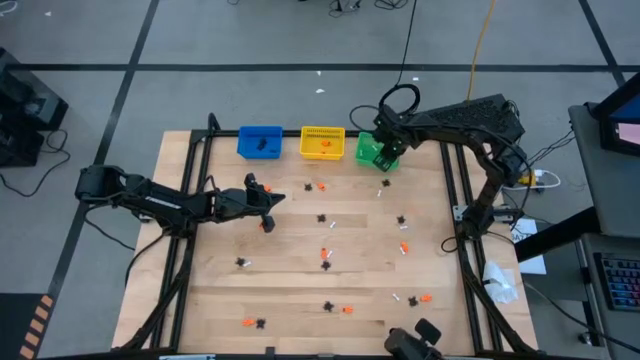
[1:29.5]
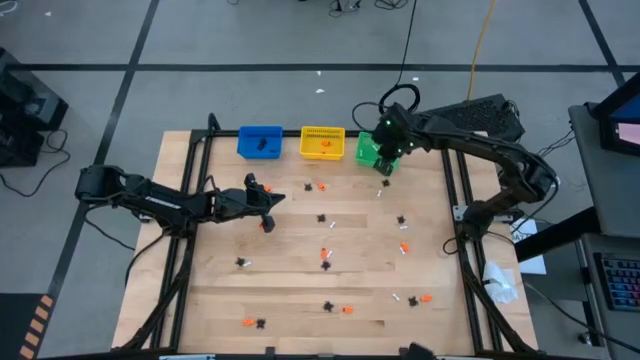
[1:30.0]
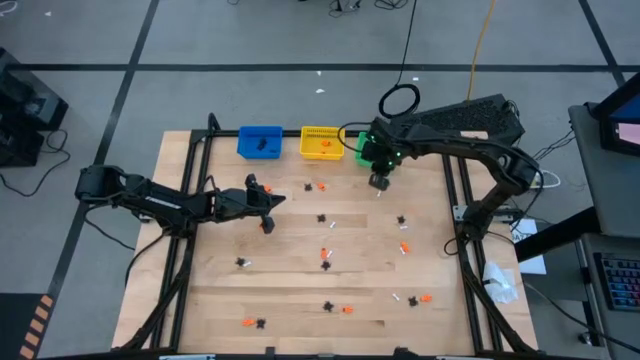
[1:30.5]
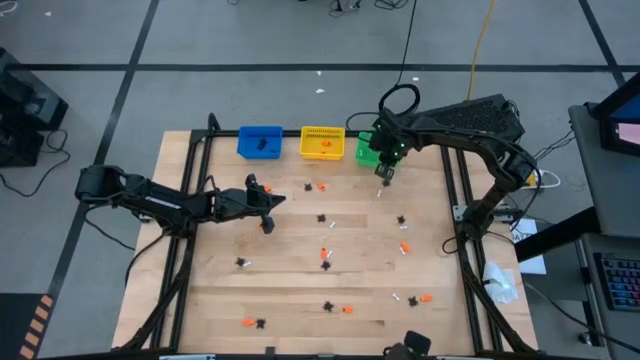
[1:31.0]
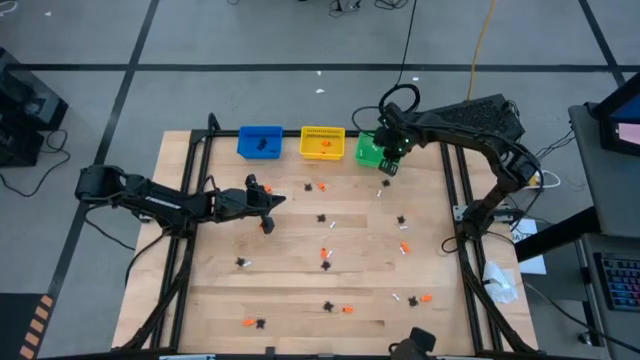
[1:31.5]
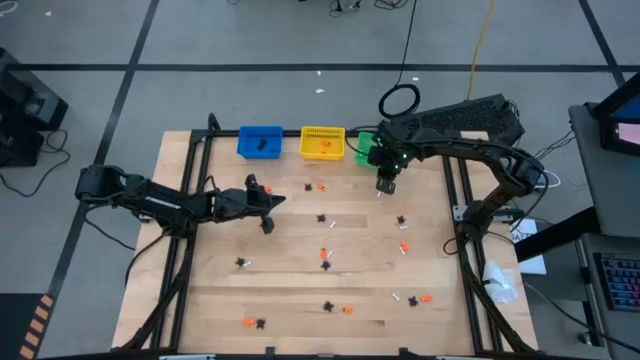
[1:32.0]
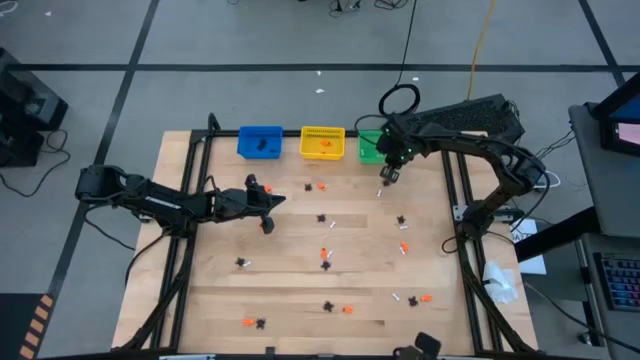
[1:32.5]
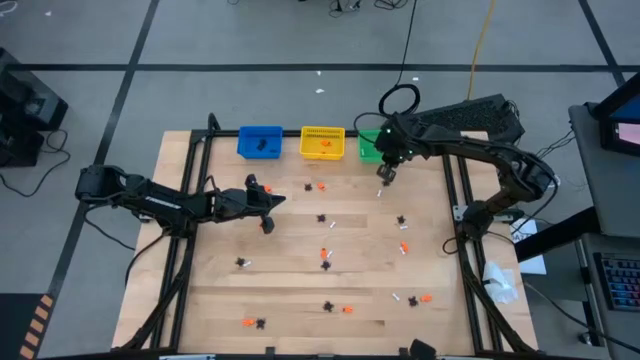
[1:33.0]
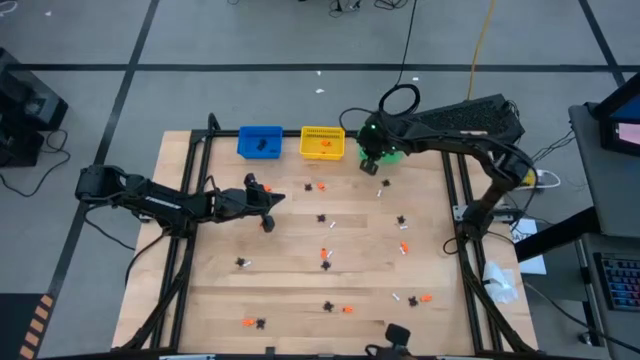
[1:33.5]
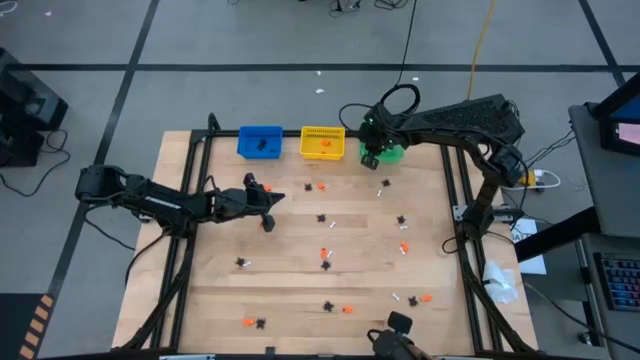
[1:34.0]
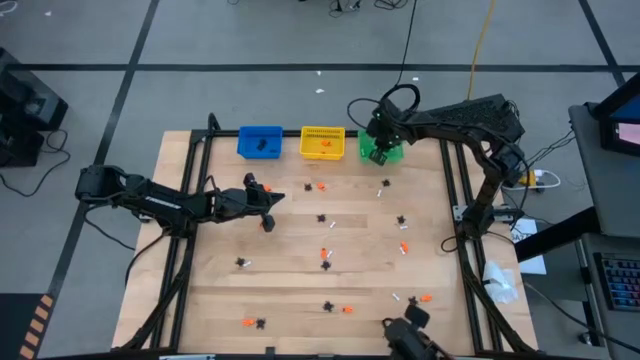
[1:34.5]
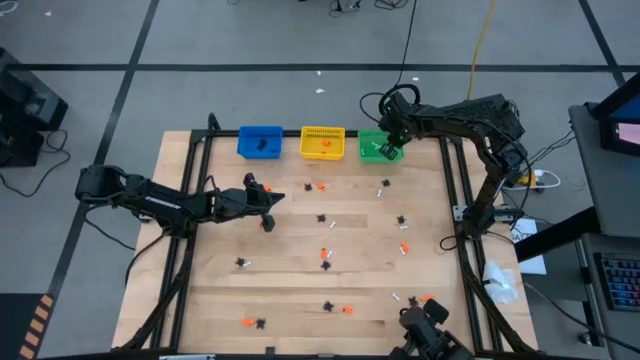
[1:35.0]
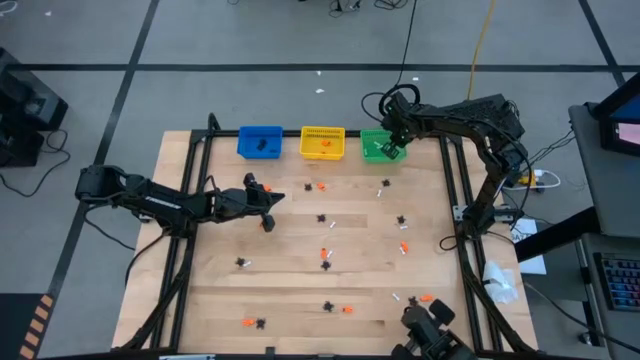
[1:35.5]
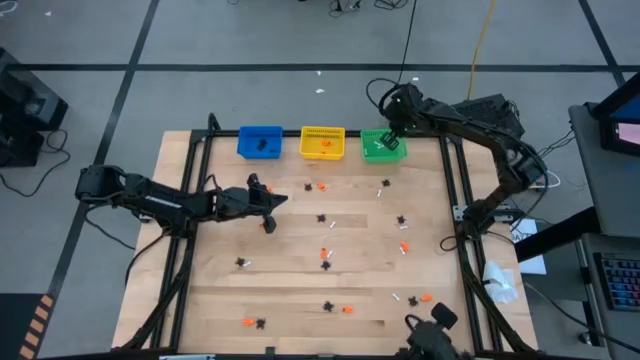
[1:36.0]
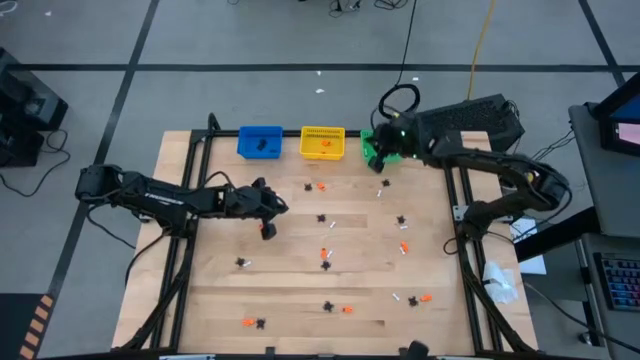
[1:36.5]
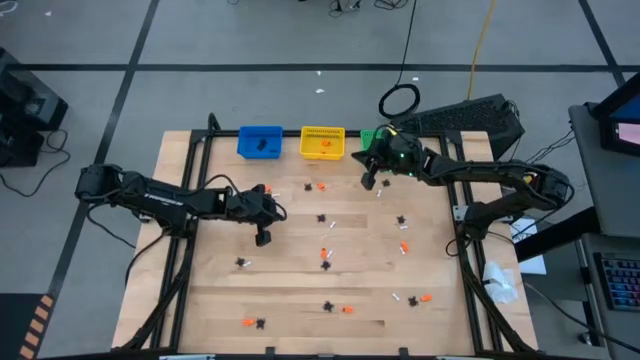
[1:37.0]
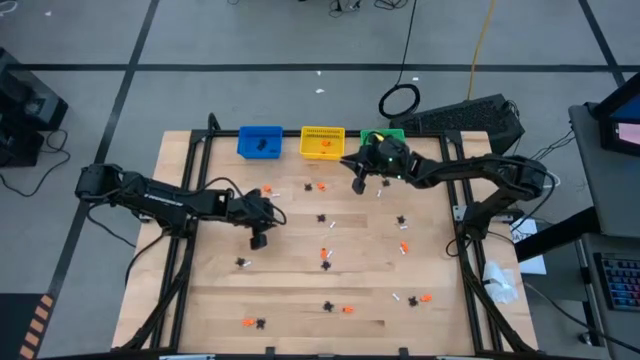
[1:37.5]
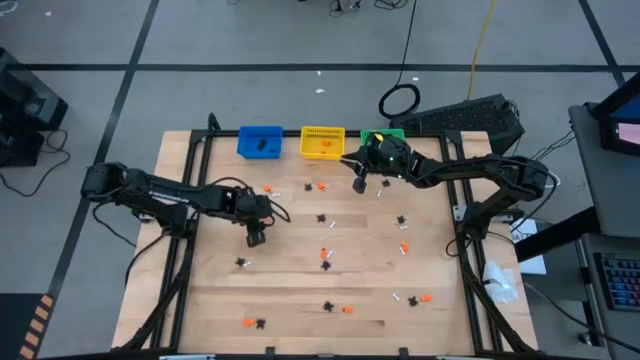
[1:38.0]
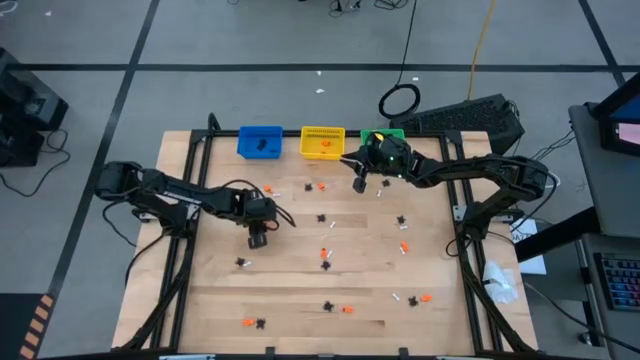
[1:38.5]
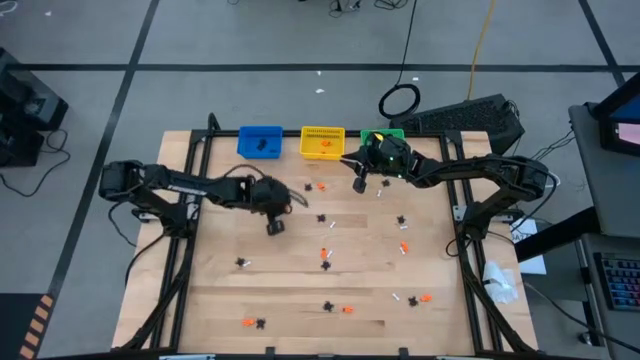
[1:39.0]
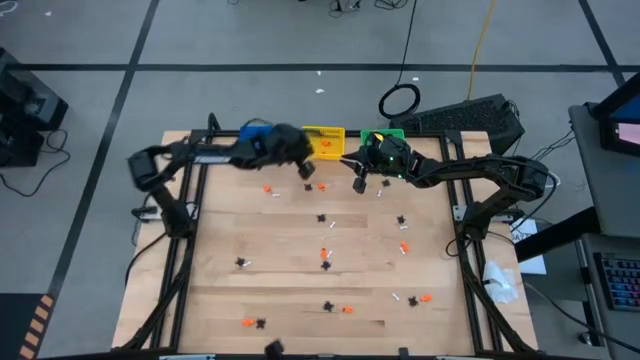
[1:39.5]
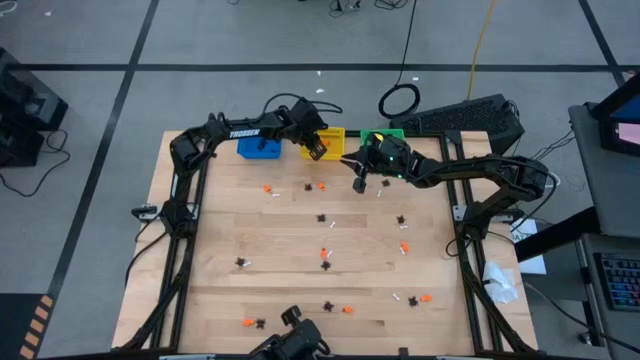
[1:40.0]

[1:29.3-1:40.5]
Task: Sort Halloween decoration
Put the orange skeleton toy into the yellow bin

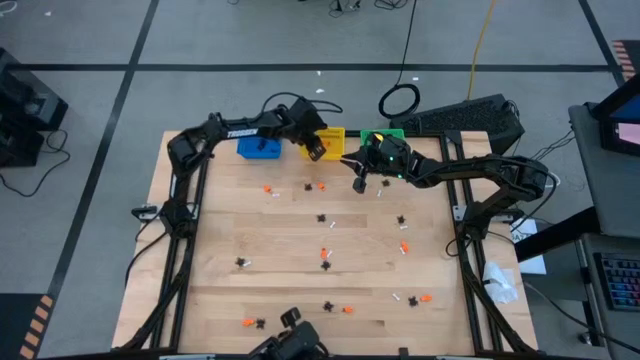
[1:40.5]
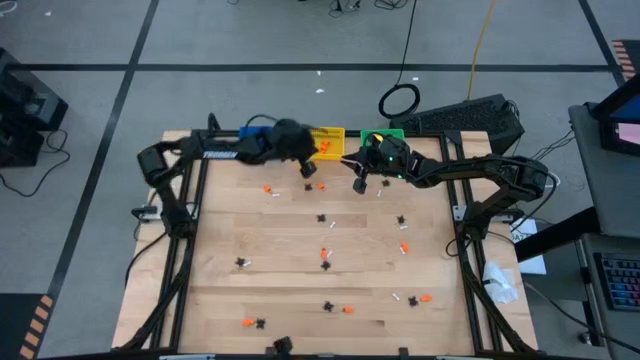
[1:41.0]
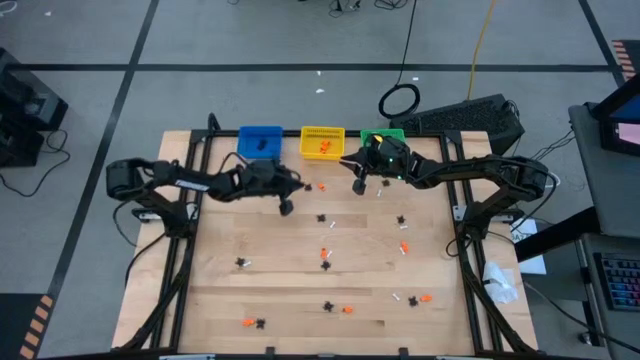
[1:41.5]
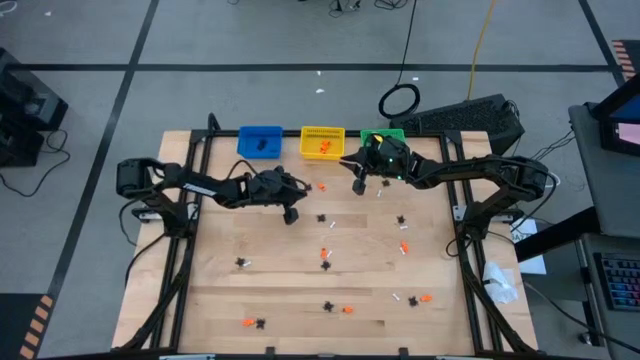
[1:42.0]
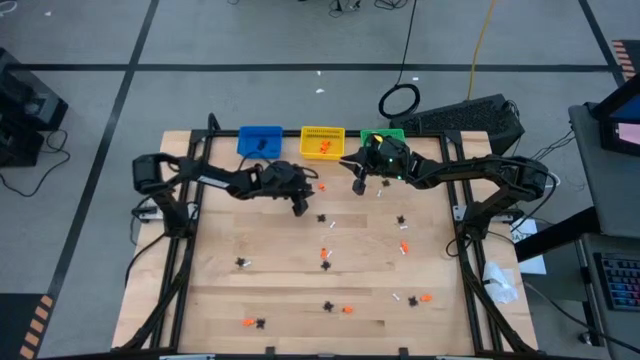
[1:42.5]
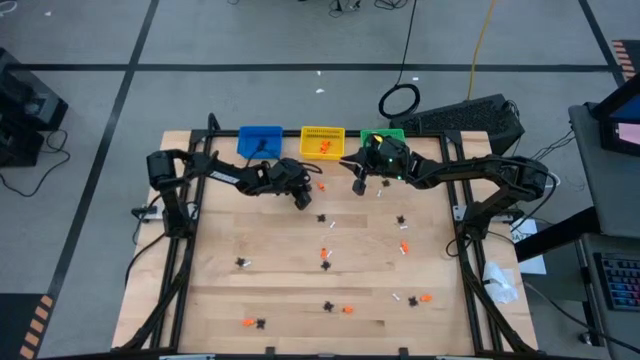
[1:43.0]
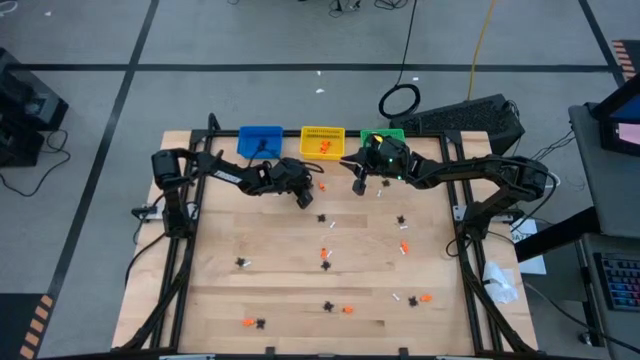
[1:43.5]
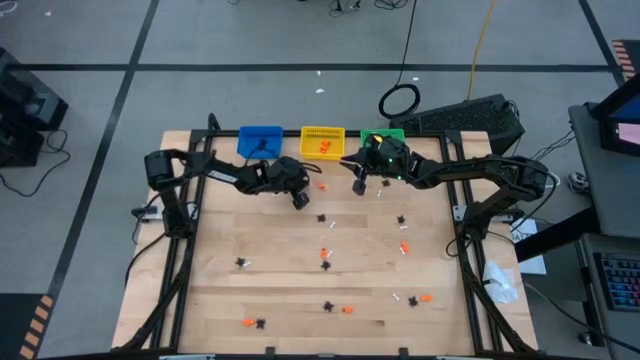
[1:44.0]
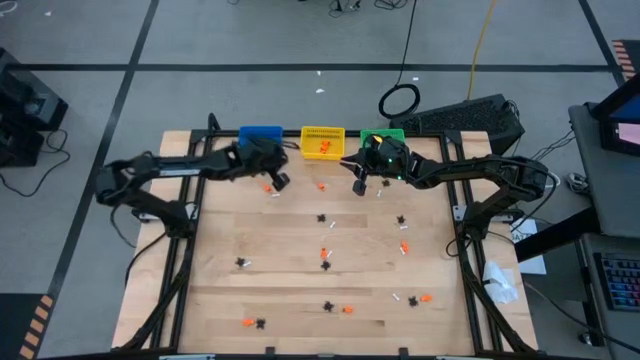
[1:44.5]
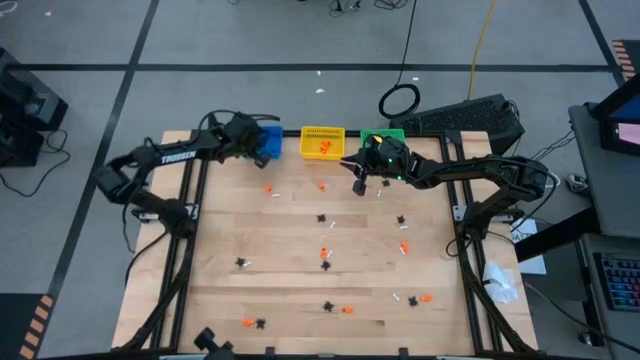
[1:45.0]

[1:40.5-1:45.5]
Put the black spider toy into the blue bin

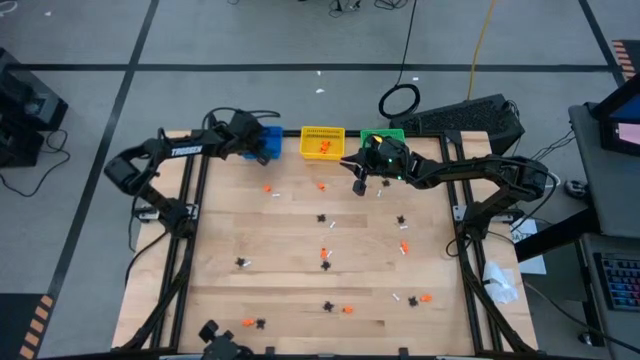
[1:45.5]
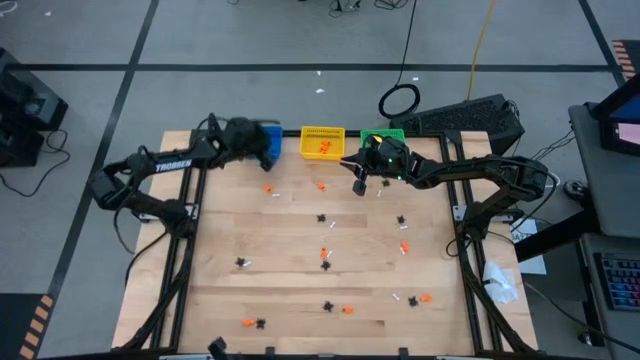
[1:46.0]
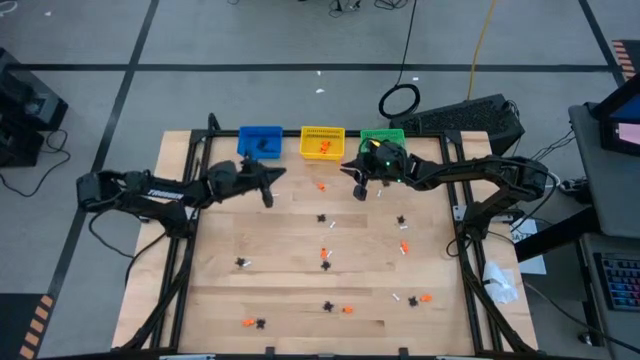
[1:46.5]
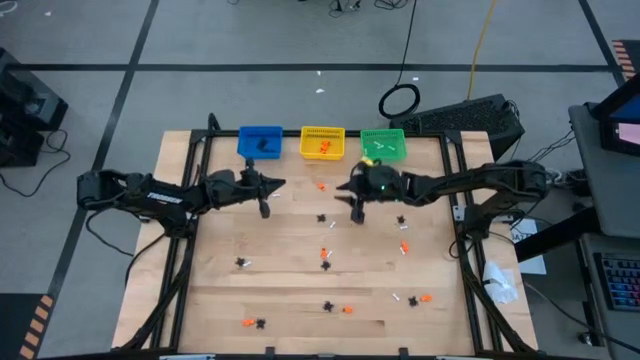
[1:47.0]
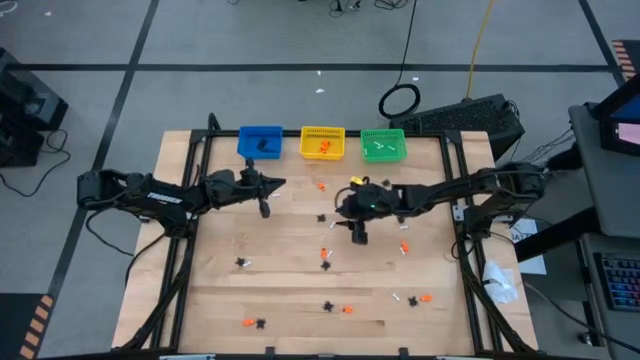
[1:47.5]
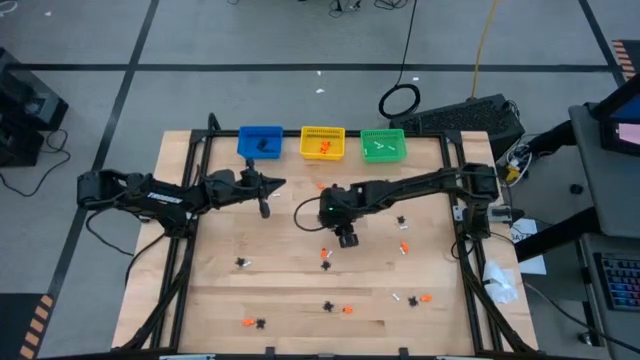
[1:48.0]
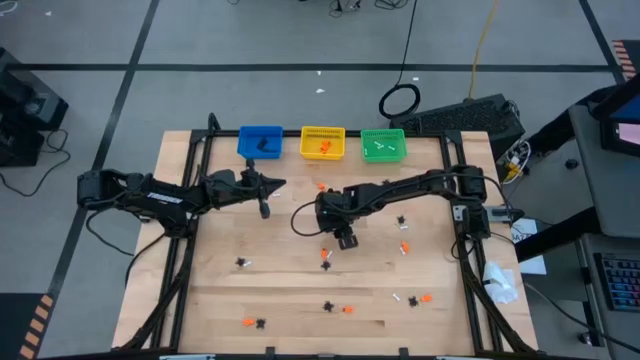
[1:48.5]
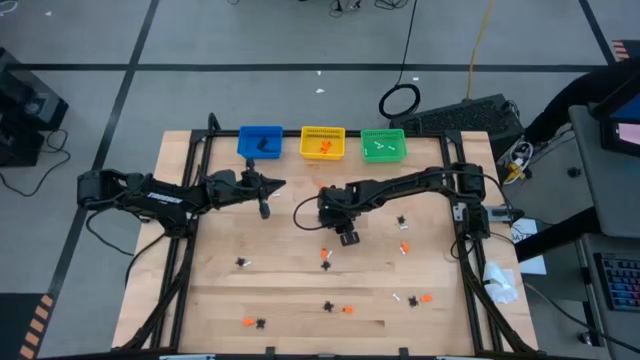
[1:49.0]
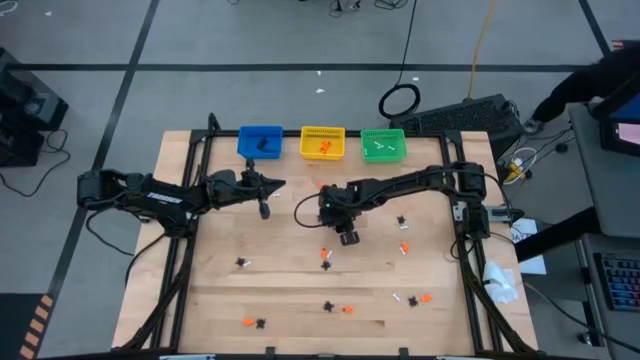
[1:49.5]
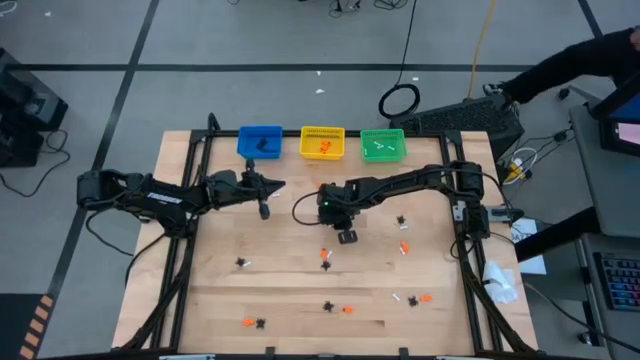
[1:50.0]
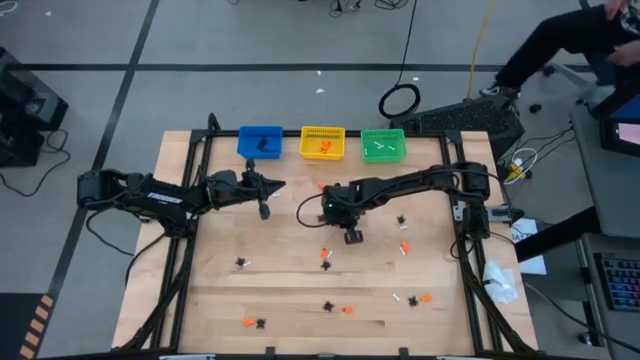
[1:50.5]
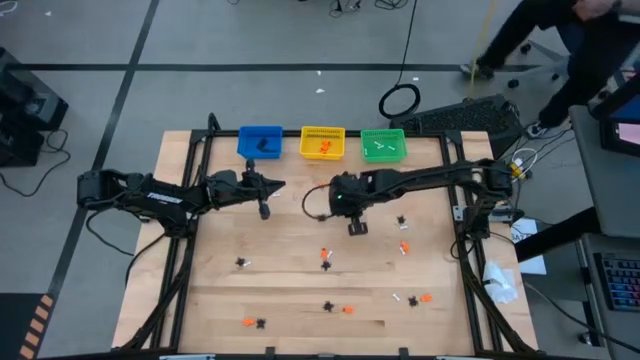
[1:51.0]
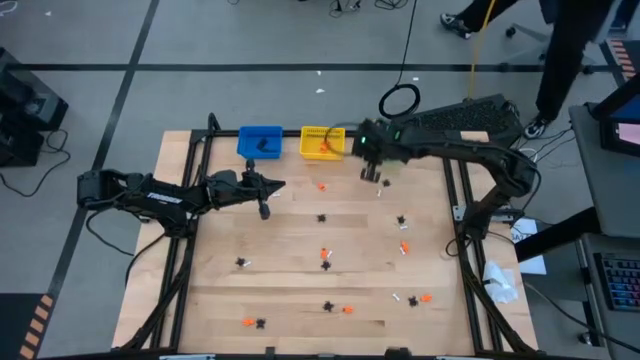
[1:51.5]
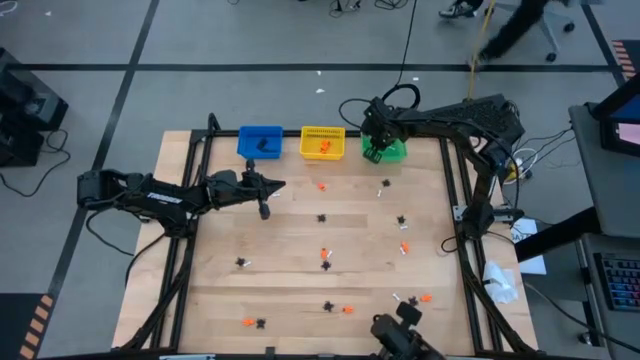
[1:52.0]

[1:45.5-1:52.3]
Put the white bone toy into the green bin
